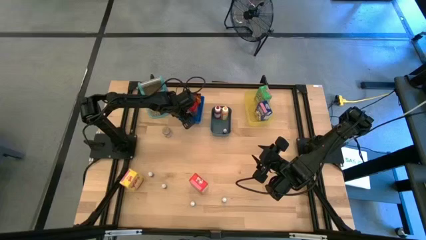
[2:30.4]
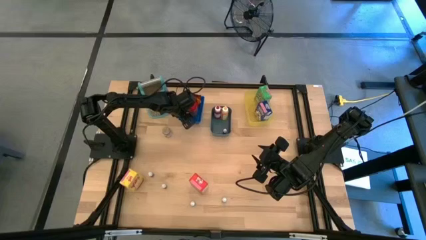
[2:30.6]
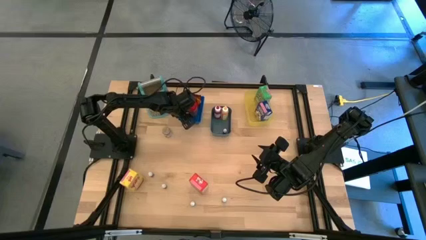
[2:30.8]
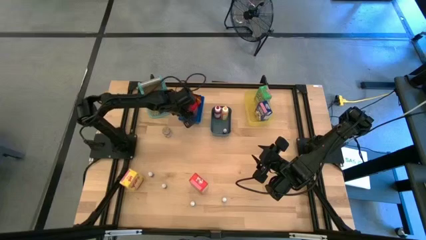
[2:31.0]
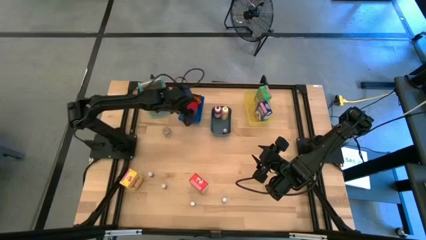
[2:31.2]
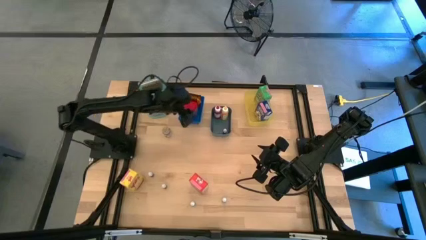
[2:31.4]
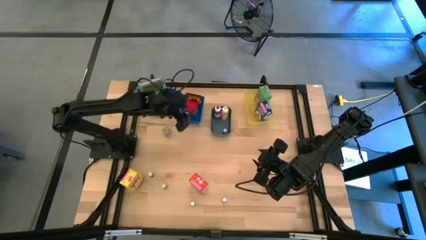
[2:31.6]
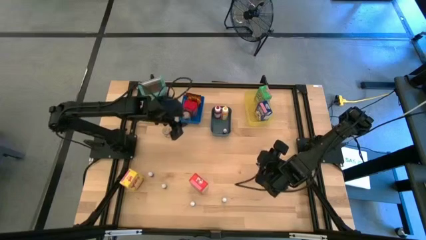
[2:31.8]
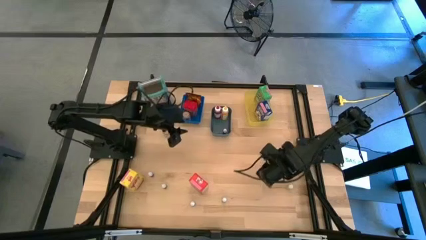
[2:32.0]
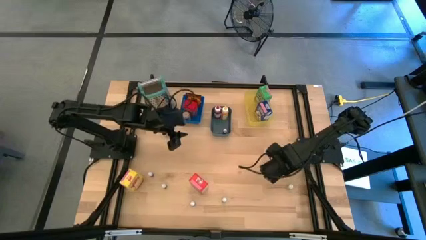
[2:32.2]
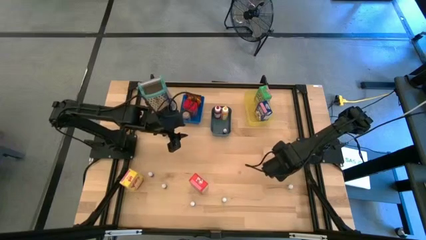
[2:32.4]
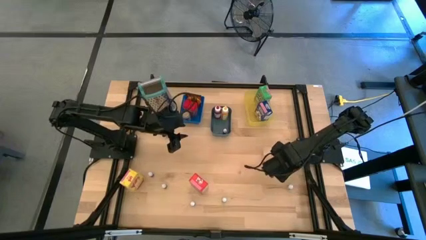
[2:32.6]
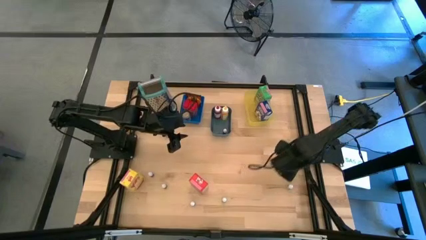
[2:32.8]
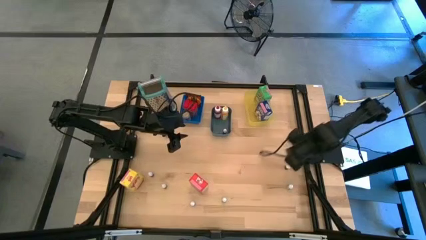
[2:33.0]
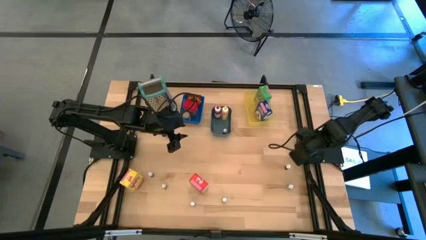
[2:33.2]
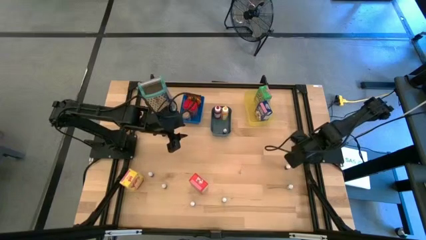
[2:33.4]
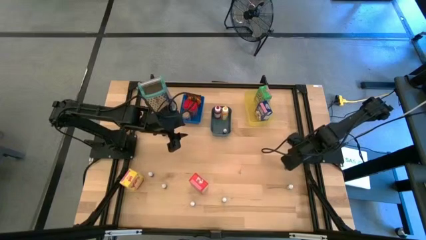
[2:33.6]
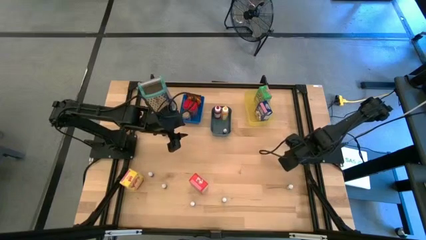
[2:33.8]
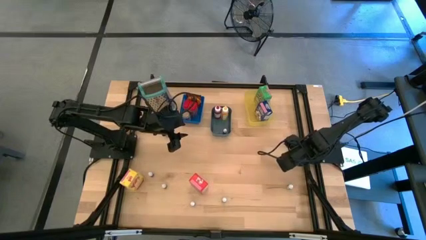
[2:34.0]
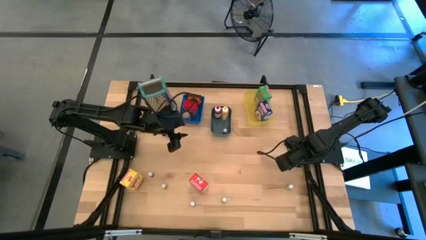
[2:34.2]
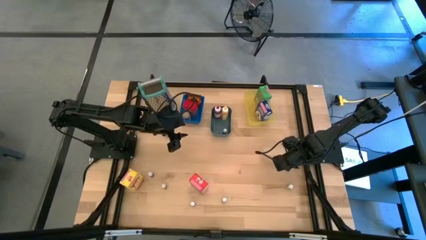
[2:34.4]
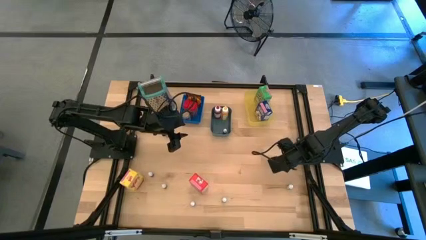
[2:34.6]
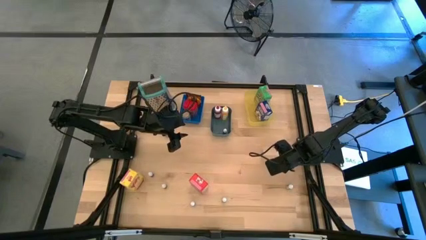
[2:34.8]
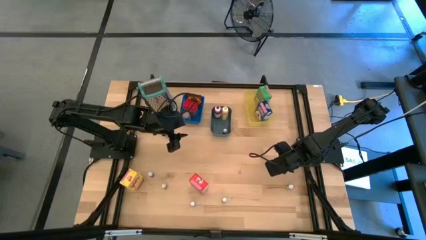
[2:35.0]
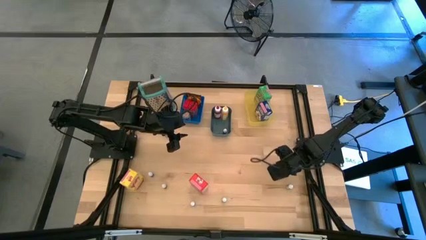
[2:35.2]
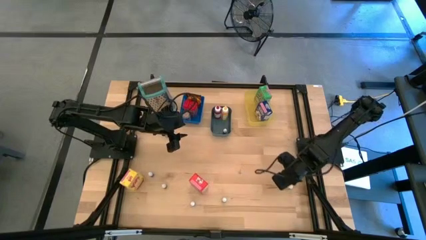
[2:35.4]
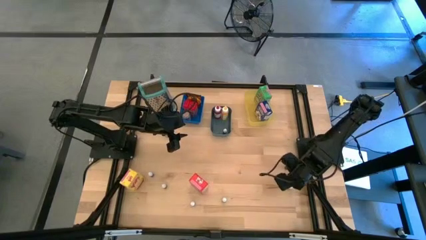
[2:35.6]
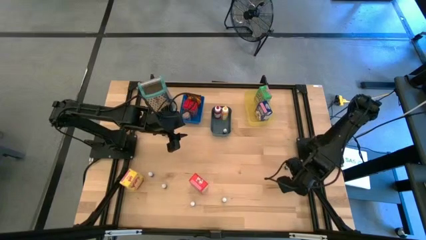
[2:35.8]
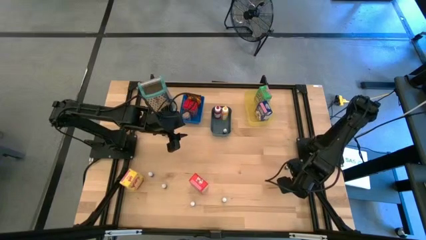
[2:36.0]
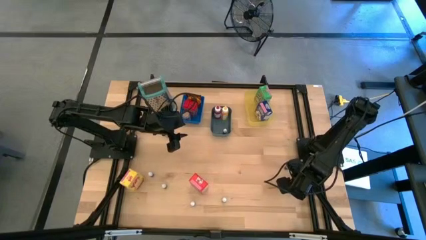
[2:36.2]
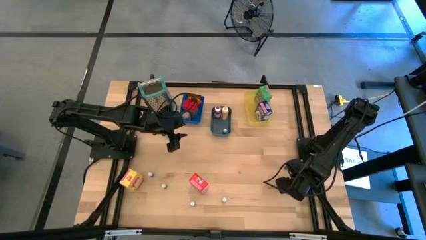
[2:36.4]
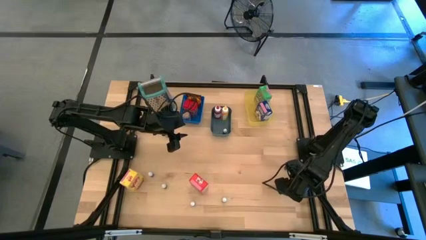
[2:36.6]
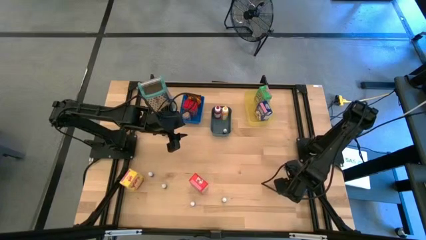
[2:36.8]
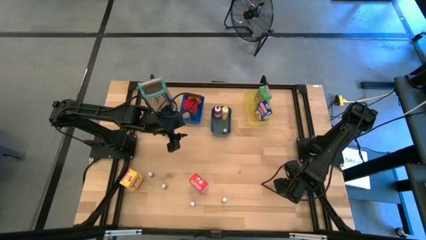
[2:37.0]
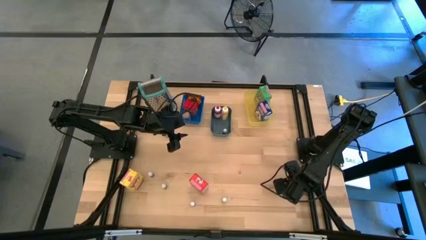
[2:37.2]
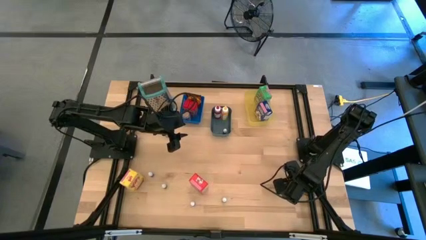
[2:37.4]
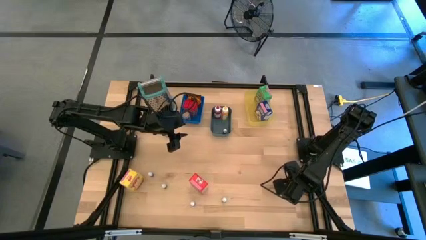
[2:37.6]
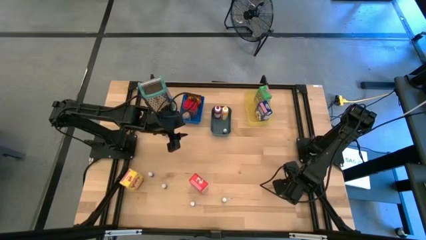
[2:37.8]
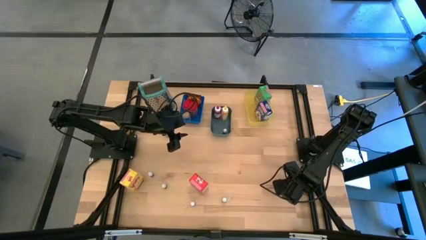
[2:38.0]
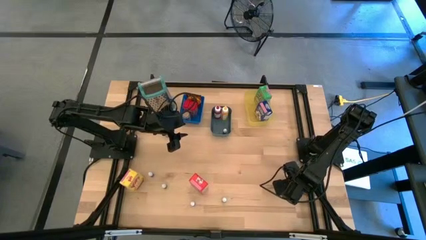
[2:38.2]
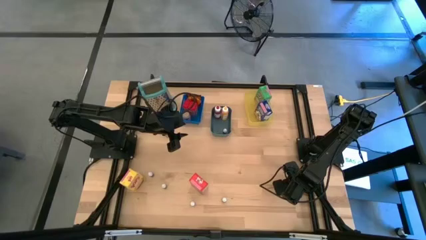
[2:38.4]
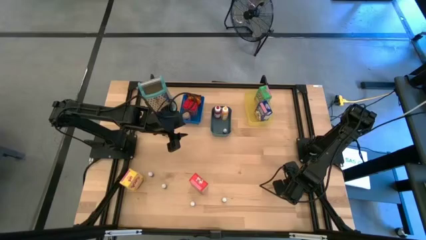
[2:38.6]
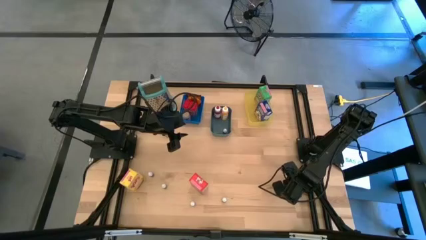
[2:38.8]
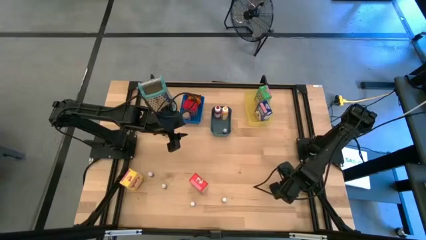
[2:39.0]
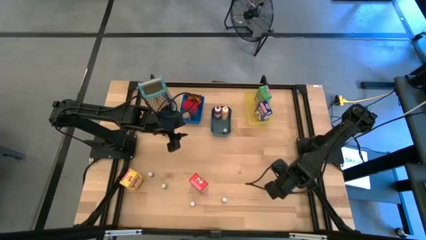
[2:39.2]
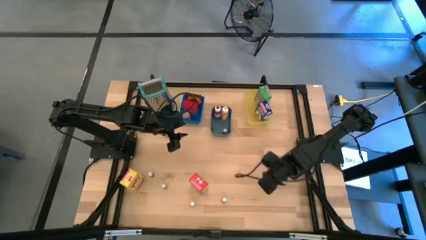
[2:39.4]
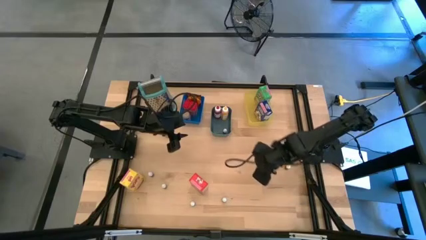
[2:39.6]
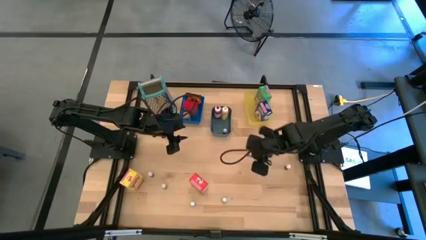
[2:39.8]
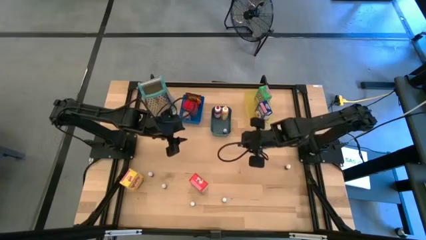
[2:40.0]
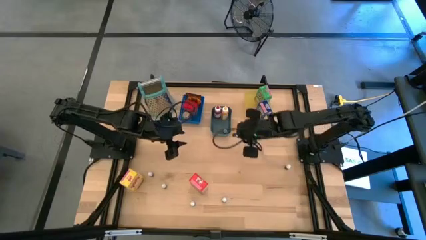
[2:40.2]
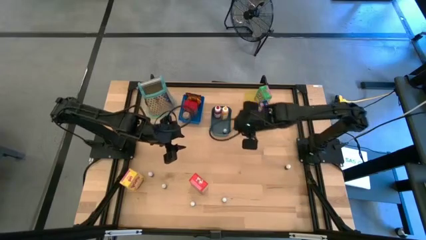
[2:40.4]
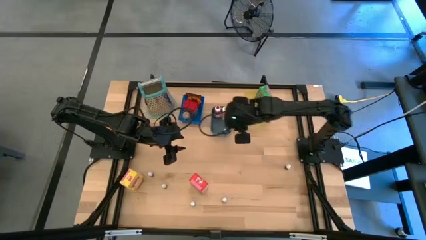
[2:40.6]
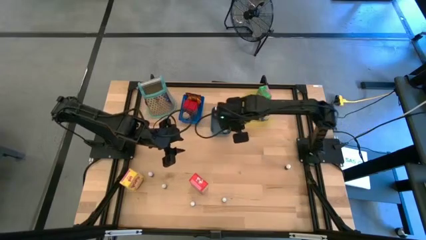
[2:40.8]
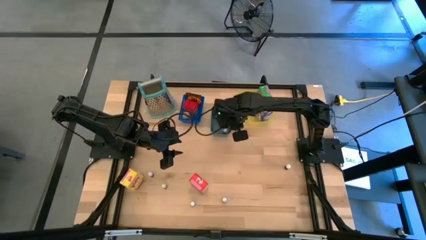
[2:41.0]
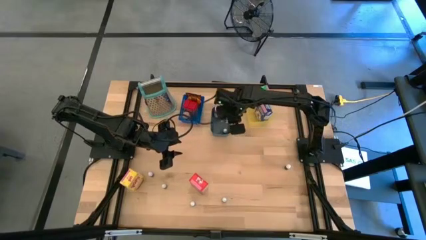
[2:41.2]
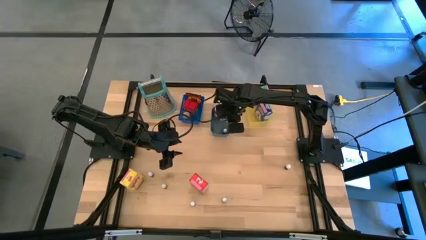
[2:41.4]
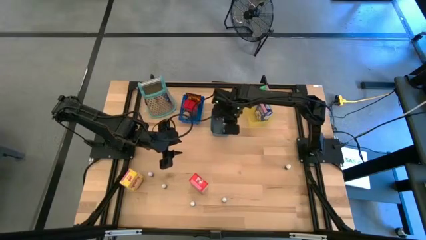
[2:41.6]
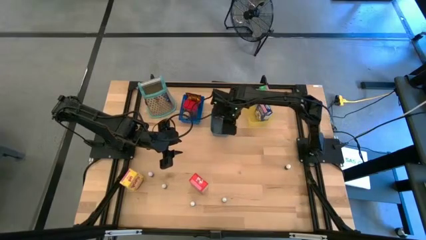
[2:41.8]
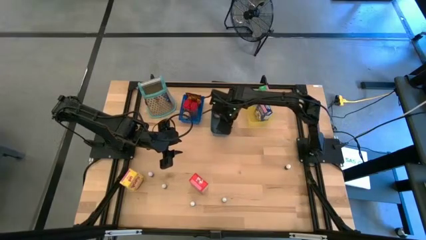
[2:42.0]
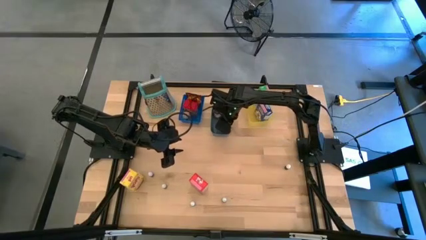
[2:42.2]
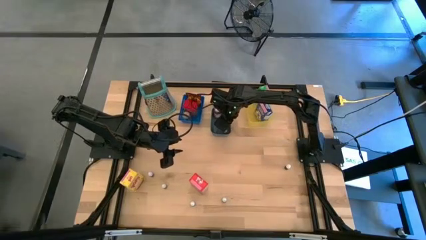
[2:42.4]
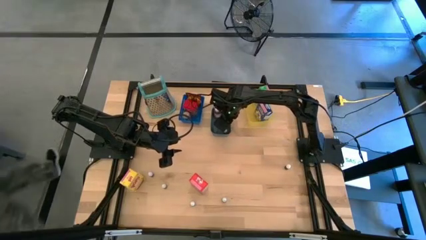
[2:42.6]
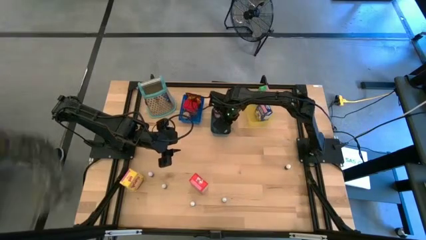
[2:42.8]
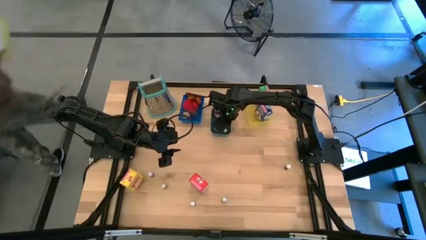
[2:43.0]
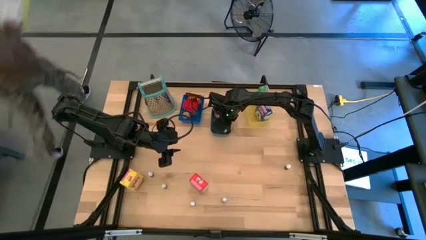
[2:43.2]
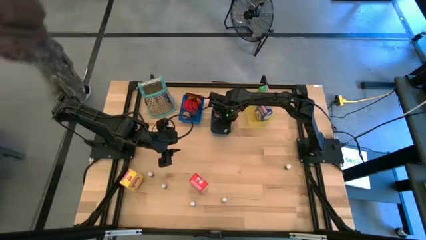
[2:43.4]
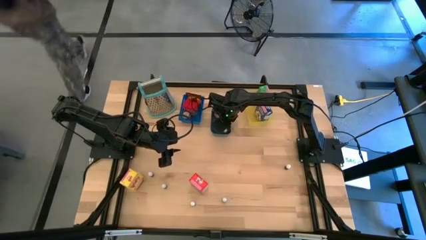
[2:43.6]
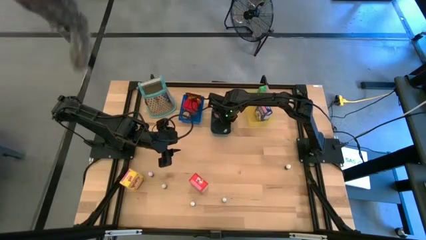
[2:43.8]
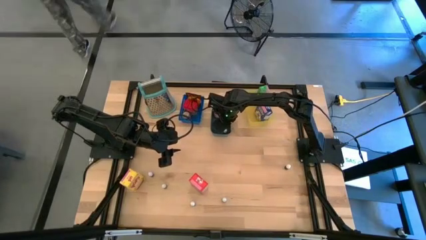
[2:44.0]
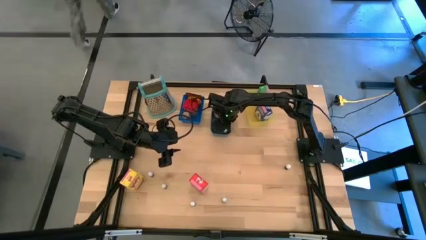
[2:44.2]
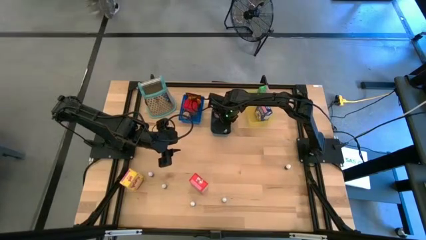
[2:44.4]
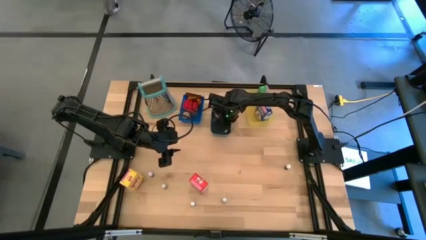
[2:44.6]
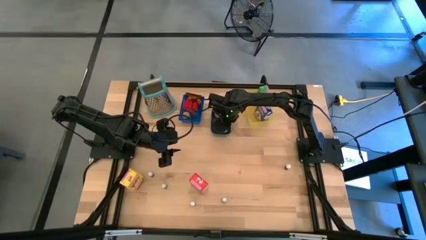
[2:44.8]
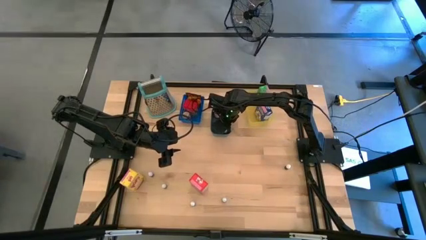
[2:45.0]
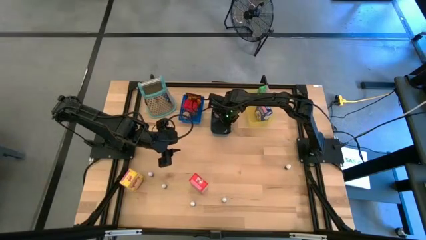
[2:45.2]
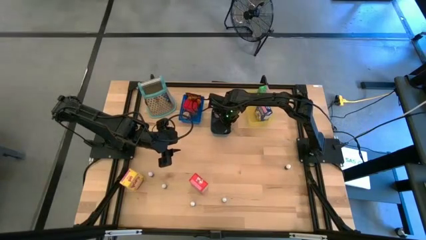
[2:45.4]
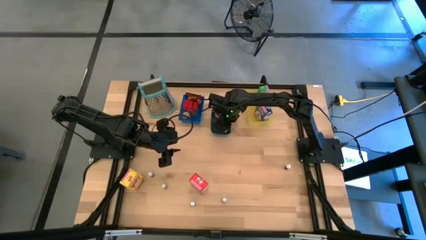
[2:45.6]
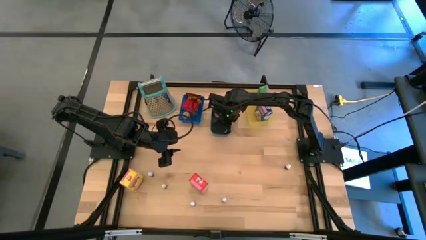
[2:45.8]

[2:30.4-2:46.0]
Task: Pick & Place Kitchen Items
Put the small black food coloring bottle into the dark green bin

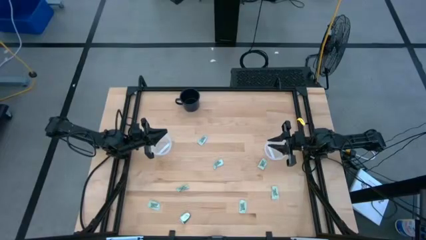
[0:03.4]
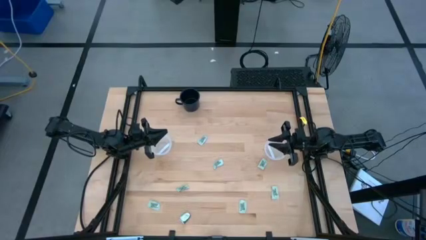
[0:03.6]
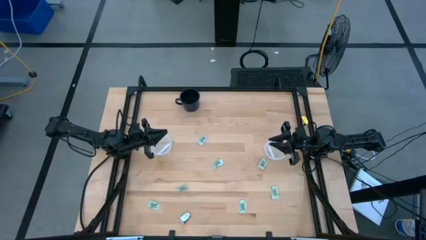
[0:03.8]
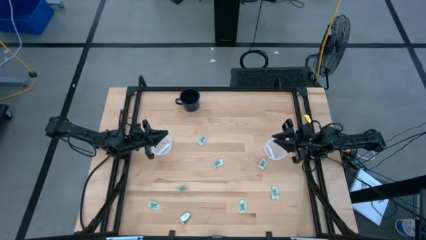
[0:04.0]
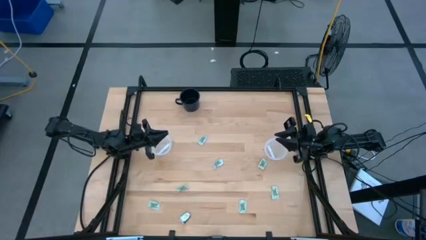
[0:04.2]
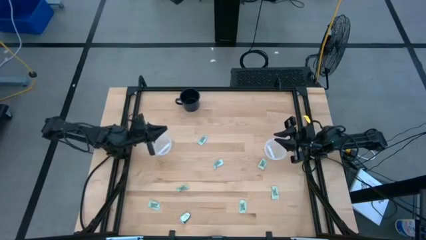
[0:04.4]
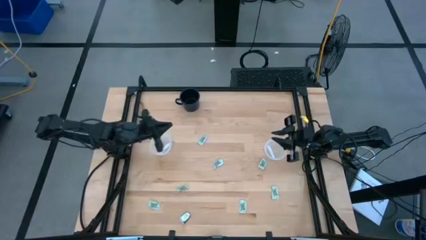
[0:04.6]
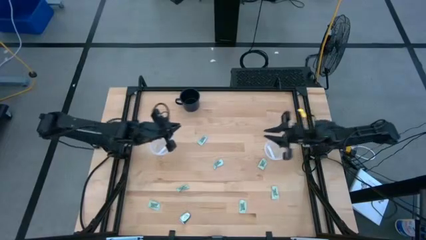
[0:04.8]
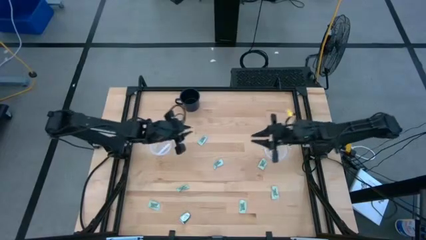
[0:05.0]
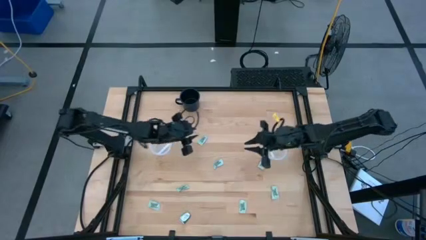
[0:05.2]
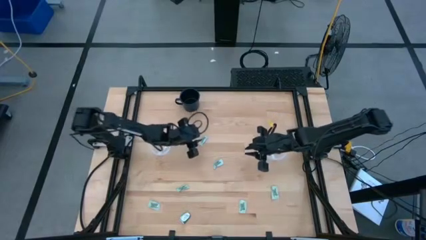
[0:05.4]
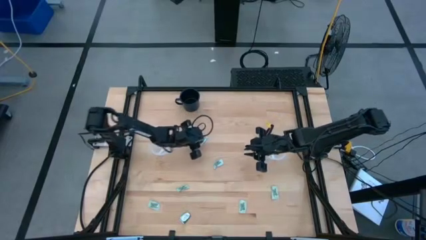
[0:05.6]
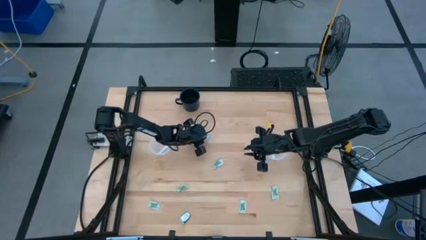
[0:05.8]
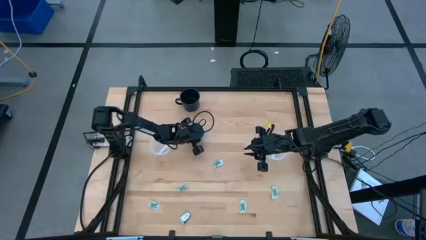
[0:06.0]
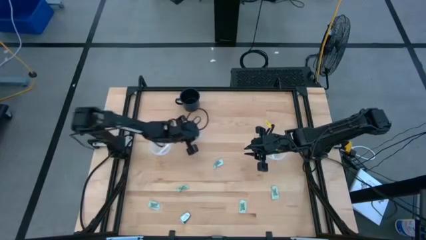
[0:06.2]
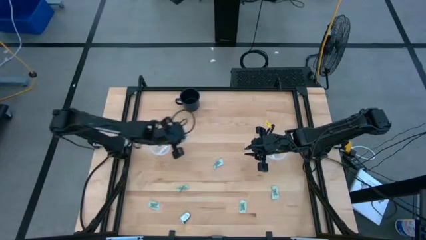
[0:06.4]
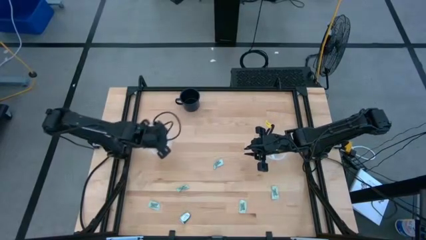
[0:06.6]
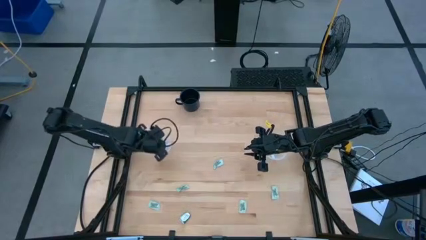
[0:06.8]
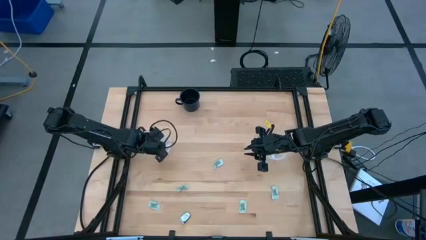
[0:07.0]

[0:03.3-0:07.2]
Task: Pick and place Stevia / Truvia into bins
Put the stevia packet into the left container
